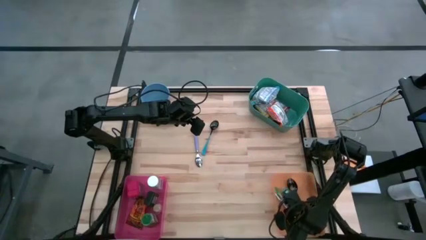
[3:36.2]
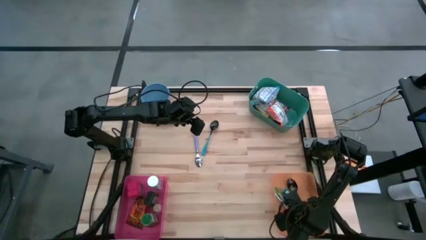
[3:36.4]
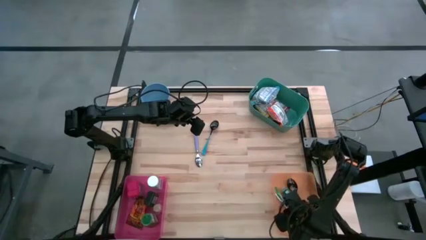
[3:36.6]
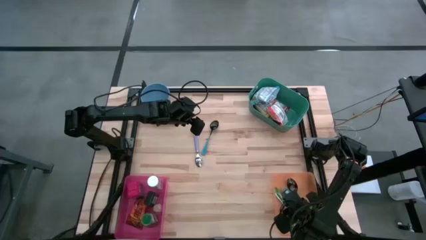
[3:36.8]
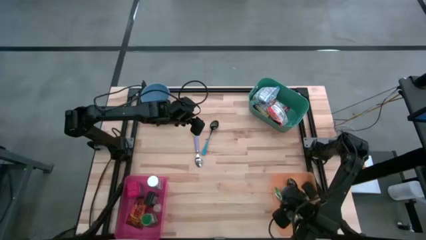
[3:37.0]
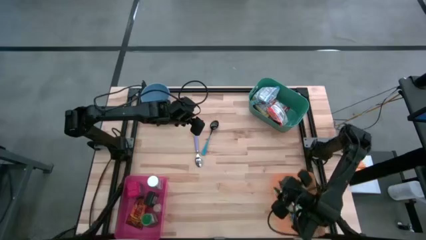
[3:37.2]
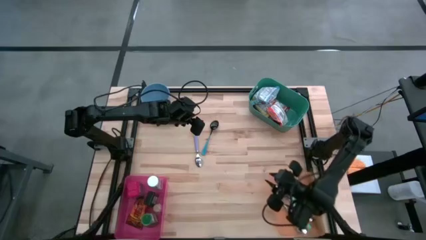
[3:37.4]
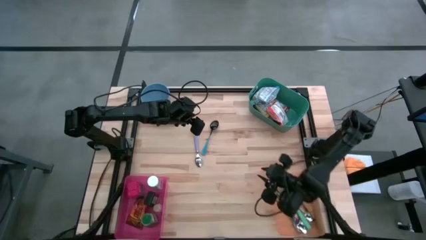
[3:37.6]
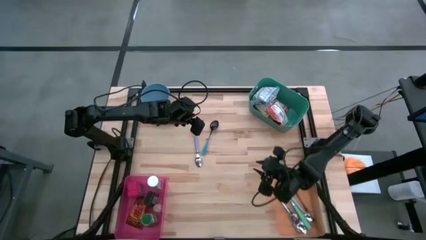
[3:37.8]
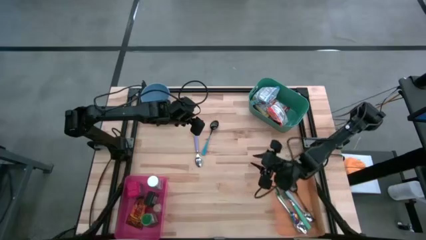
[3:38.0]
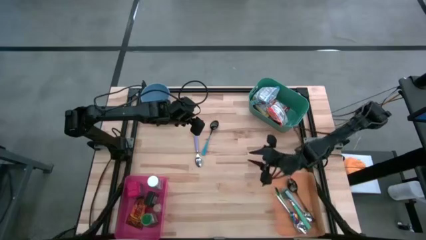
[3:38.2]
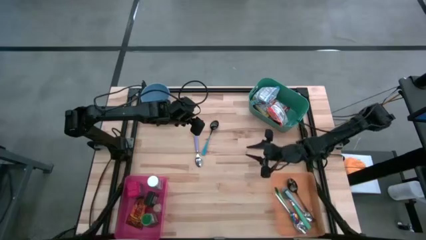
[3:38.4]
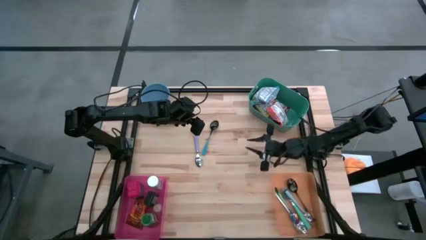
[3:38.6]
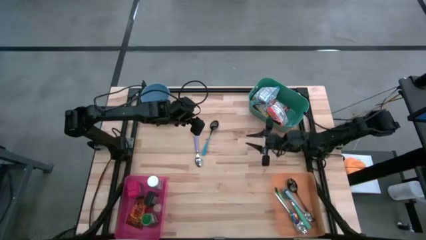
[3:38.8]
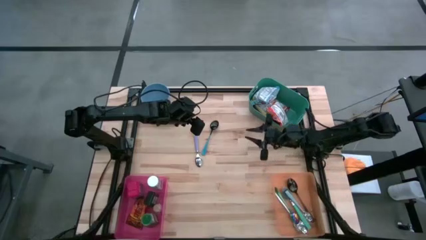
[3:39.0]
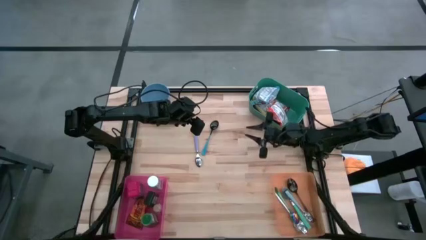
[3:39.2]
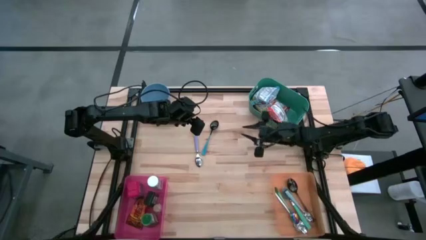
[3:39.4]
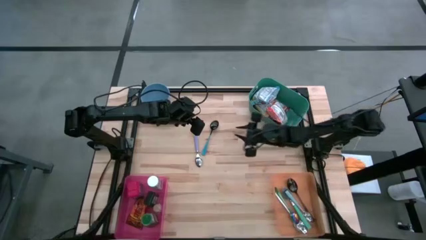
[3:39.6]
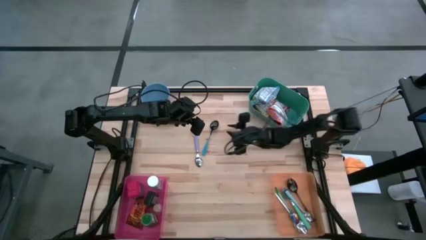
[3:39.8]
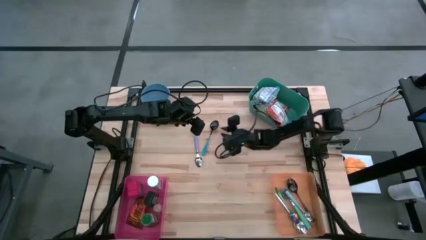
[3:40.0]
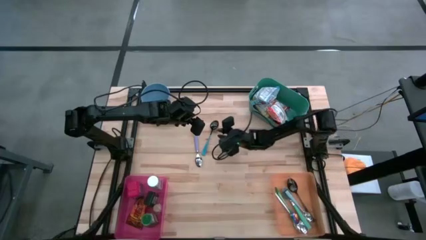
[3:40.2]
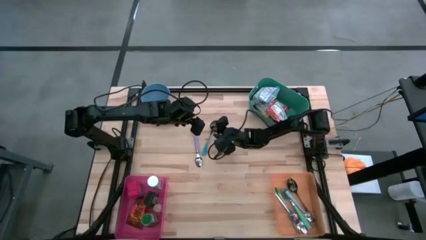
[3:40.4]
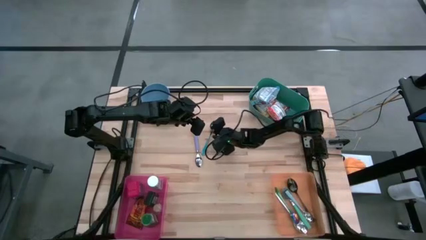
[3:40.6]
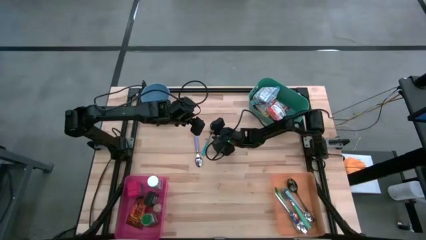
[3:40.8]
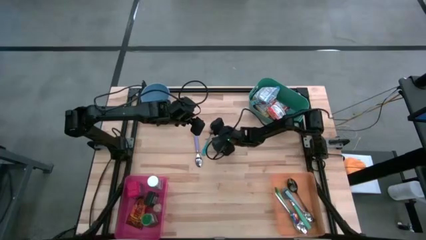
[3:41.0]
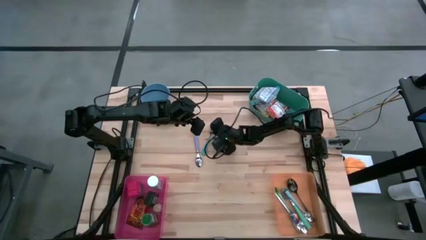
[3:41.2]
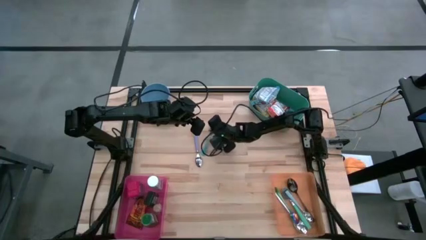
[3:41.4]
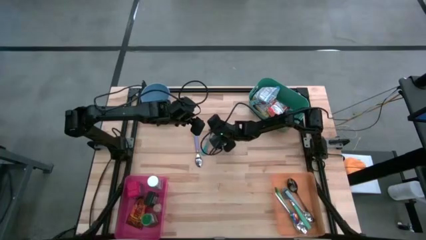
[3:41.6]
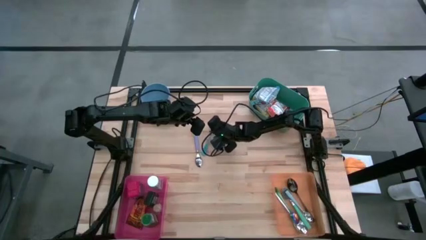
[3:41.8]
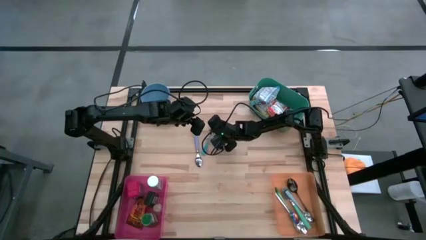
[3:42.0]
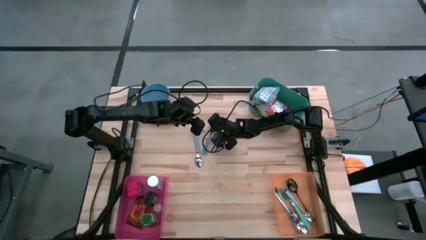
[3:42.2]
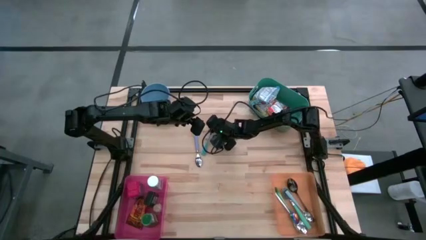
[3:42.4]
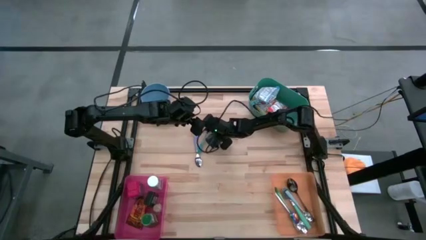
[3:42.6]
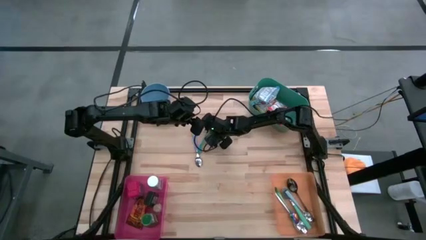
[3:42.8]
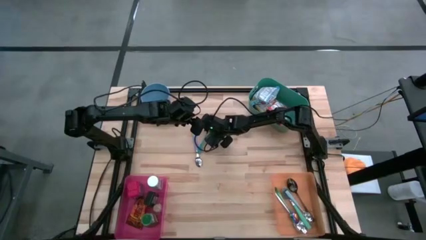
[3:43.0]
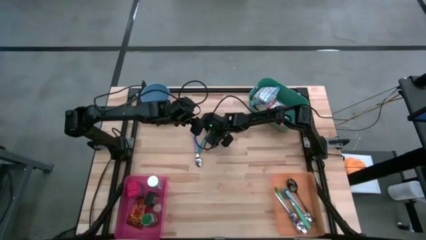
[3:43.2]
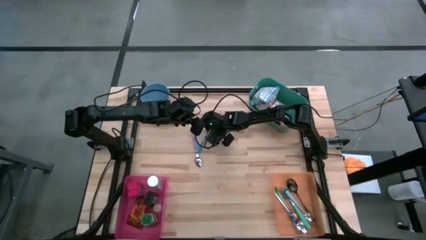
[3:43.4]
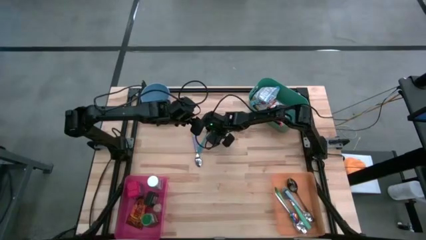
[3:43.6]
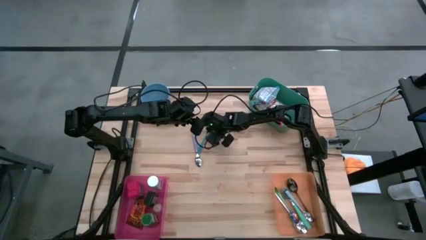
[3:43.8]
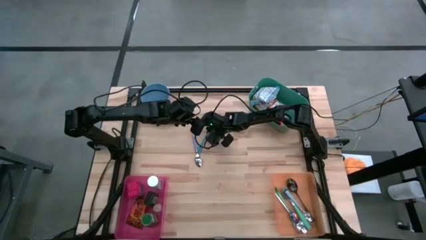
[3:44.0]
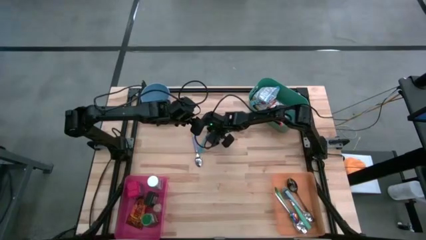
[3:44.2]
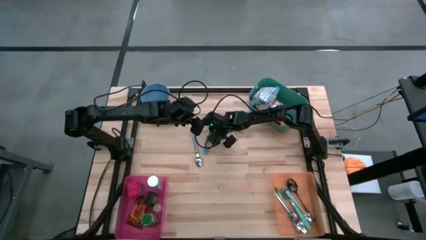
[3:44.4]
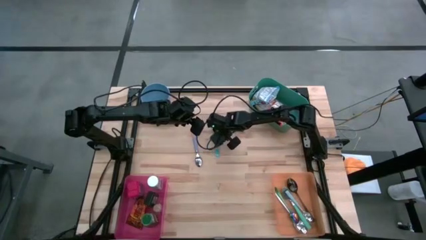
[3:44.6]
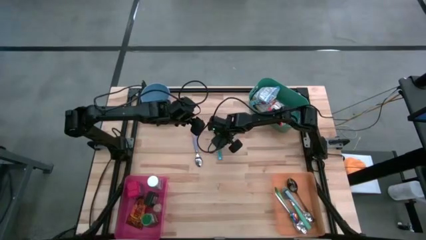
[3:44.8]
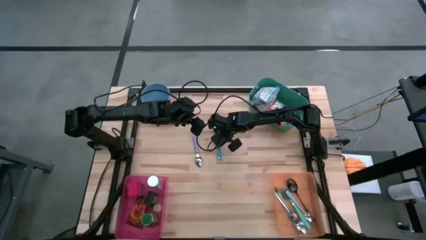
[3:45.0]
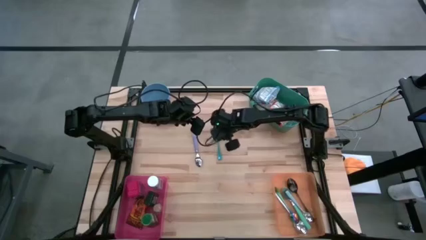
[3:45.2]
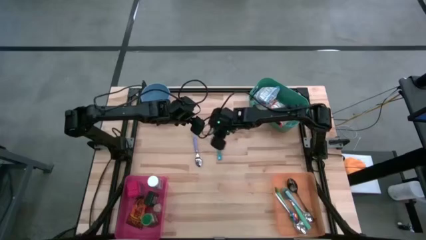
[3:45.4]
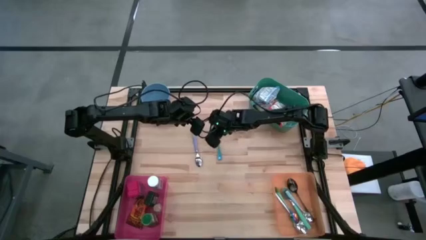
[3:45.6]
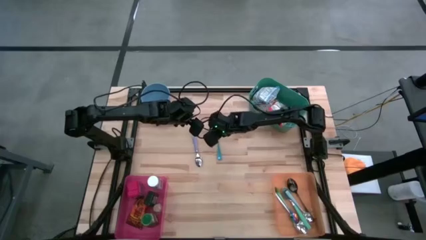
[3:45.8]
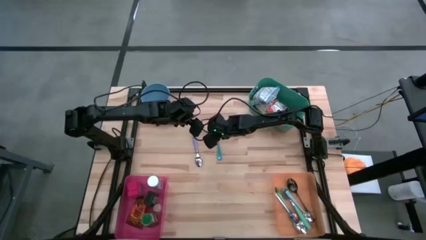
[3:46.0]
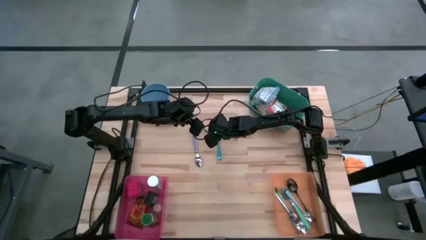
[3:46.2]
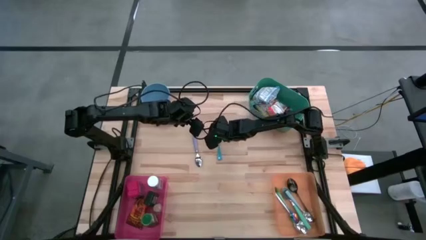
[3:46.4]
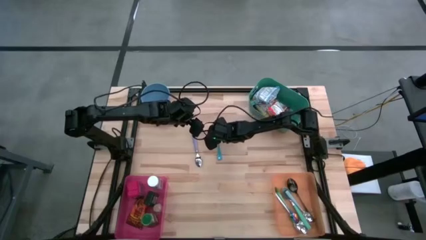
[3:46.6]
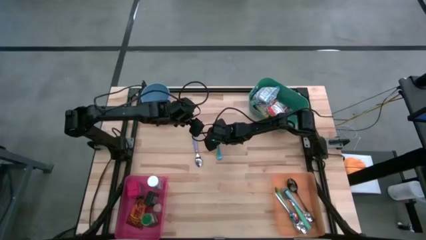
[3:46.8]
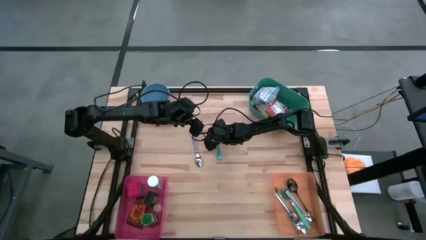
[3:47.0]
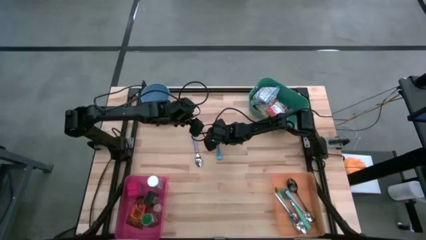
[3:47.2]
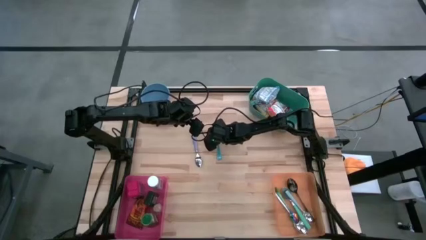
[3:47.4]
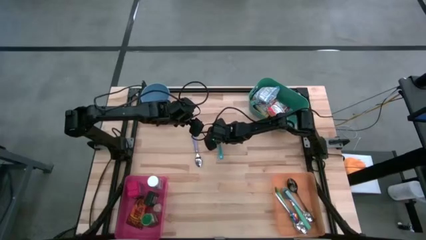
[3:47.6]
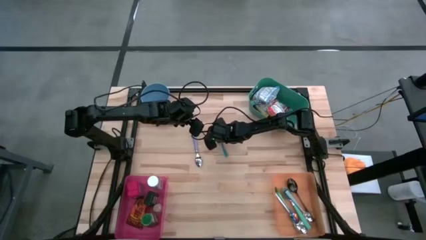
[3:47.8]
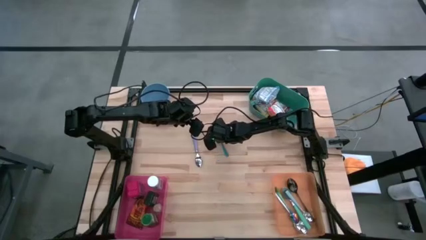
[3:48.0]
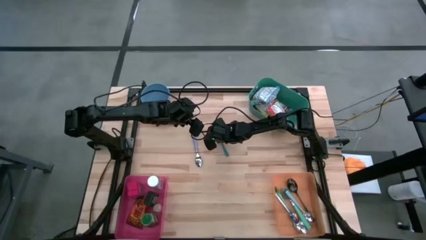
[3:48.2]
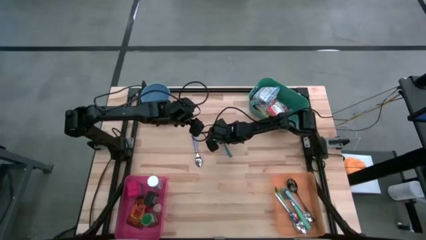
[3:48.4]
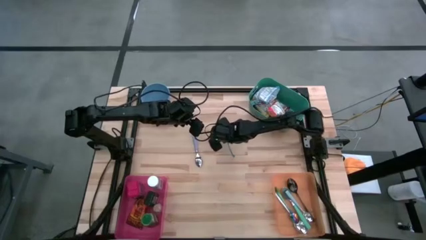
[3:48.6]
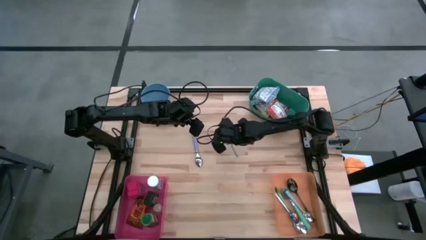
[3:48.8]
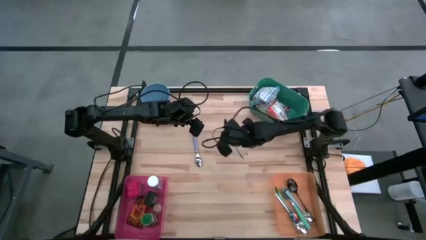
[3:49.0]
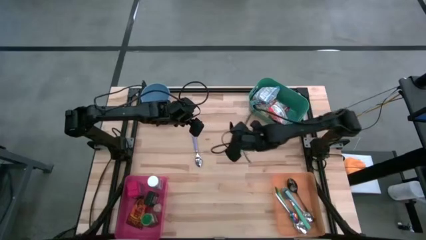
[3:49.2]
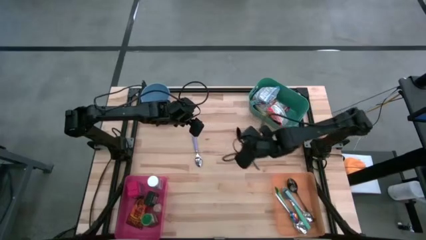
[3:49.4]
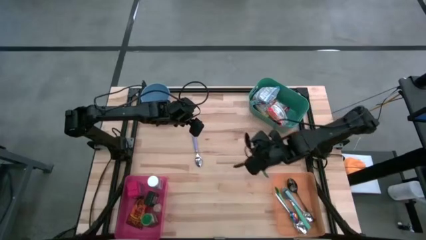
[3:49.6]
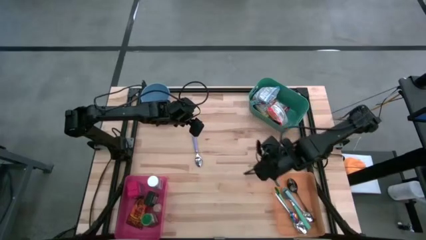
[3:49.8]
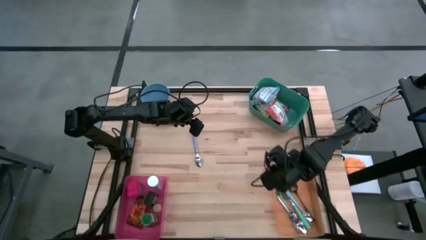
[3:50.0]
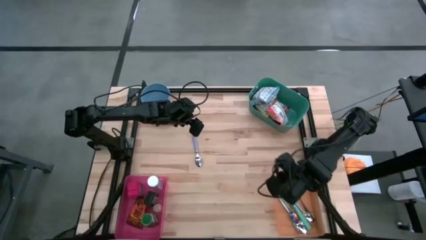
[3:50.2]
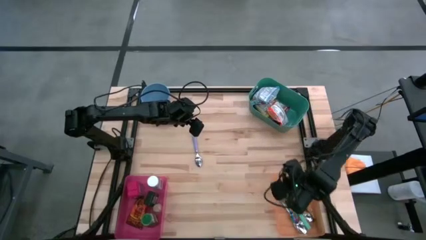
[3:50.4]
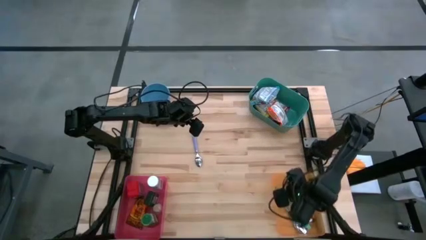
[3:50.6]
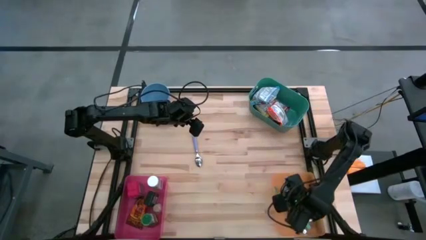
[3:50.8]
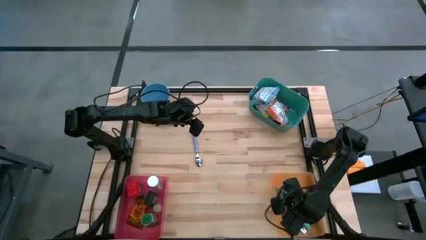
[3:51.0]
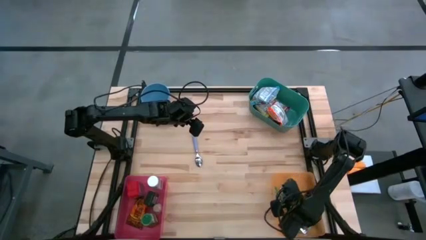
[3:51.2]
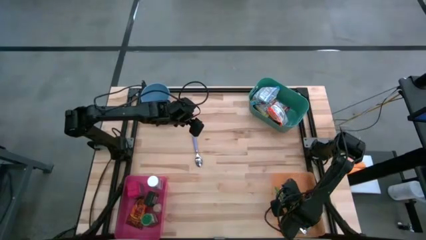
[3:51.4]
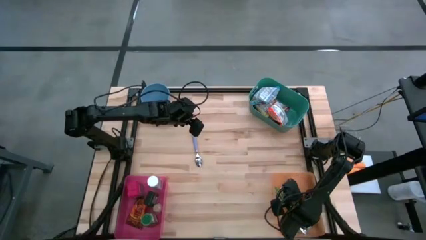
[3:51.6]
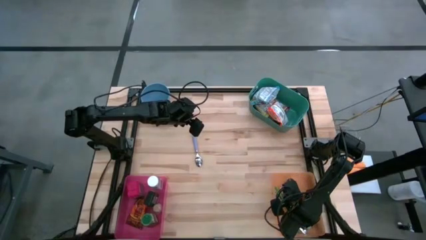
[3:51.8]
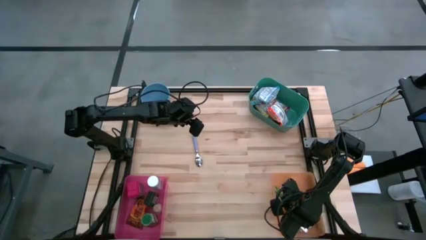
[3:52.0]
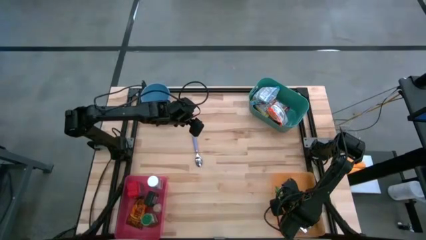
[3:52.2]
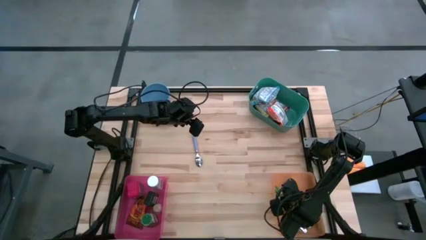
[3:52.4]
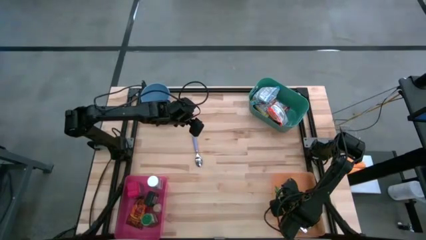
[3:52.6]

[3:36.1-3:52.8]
Put the blue spoon into the orange bin
